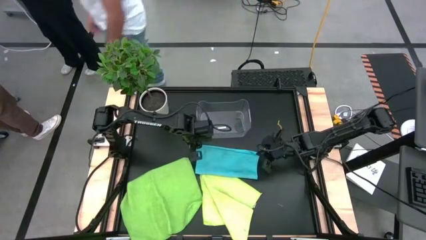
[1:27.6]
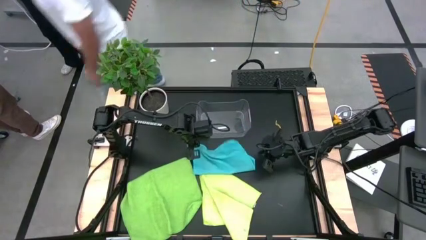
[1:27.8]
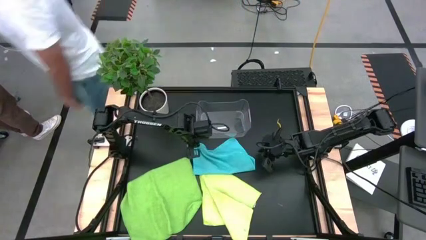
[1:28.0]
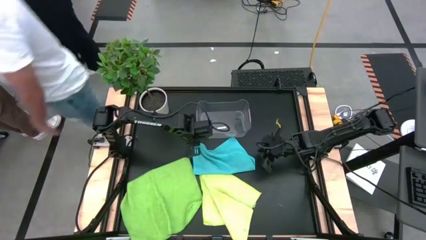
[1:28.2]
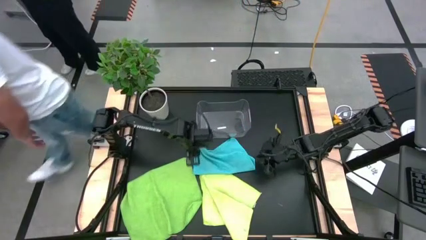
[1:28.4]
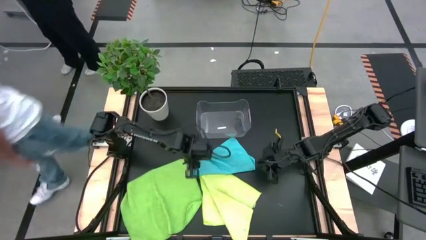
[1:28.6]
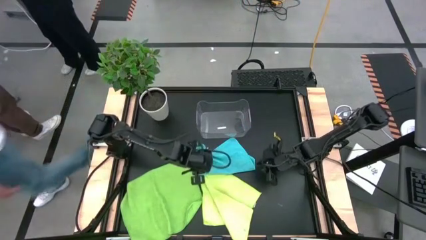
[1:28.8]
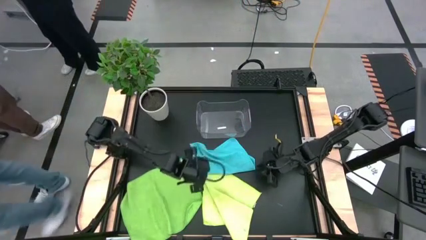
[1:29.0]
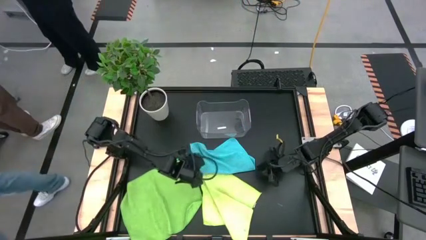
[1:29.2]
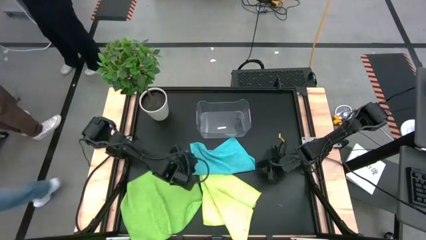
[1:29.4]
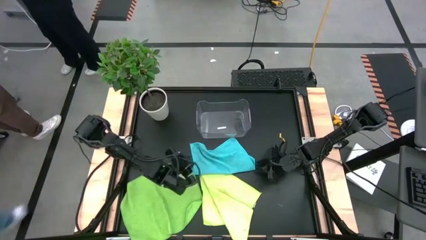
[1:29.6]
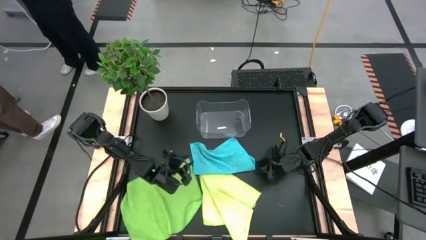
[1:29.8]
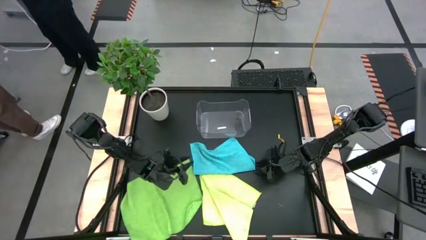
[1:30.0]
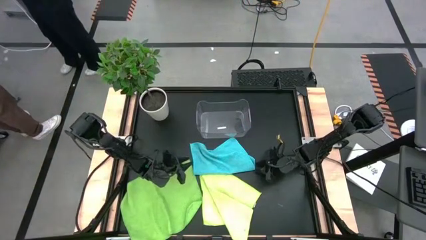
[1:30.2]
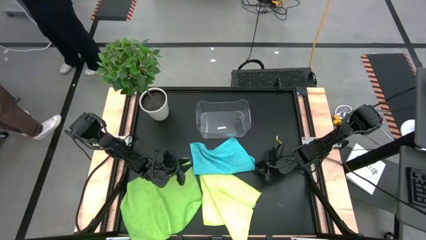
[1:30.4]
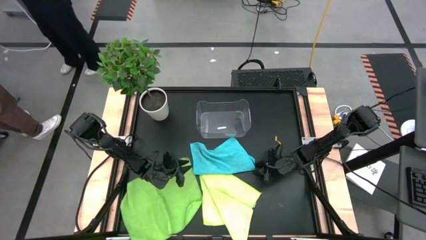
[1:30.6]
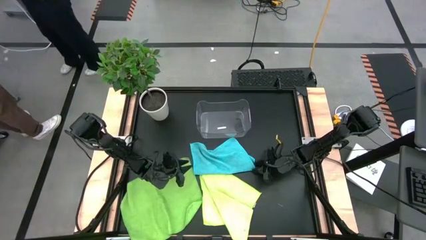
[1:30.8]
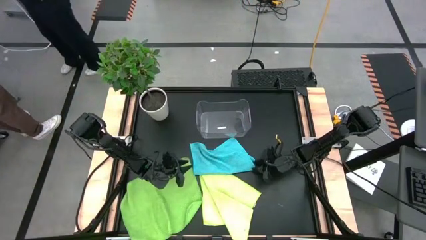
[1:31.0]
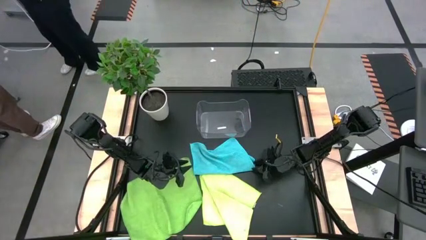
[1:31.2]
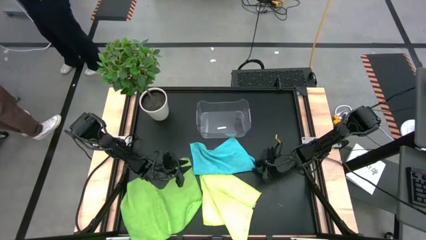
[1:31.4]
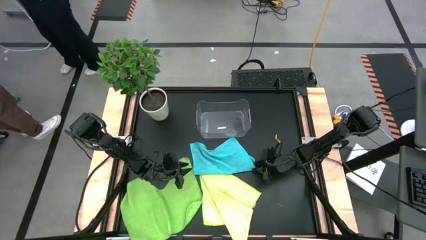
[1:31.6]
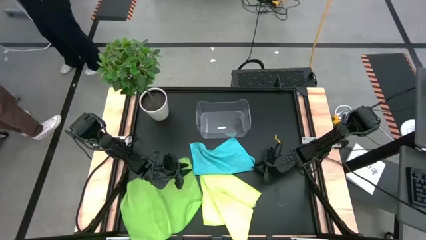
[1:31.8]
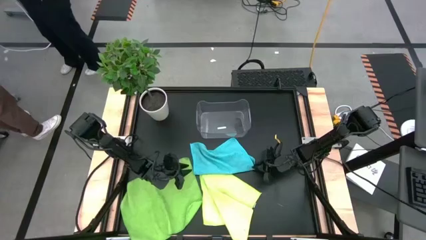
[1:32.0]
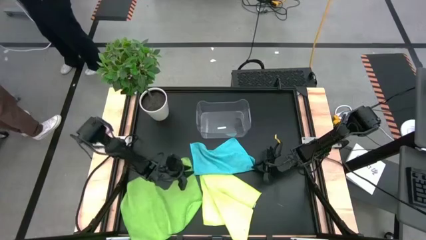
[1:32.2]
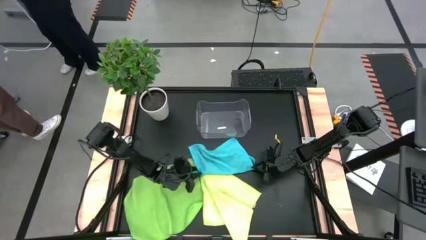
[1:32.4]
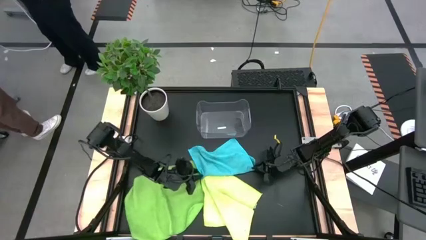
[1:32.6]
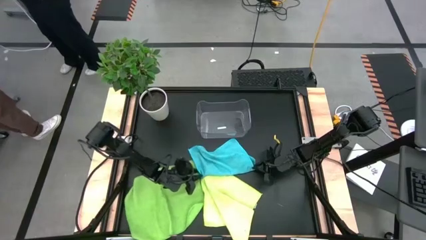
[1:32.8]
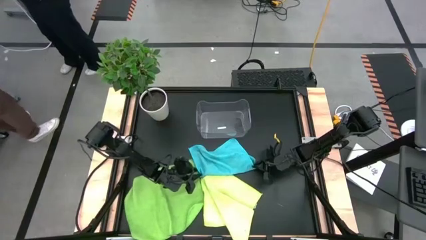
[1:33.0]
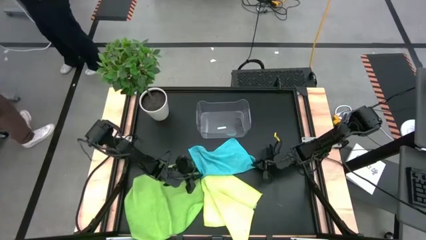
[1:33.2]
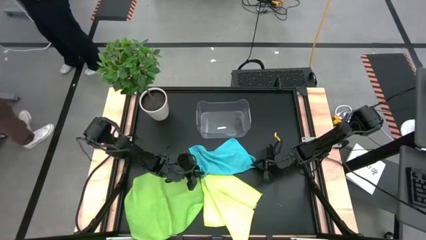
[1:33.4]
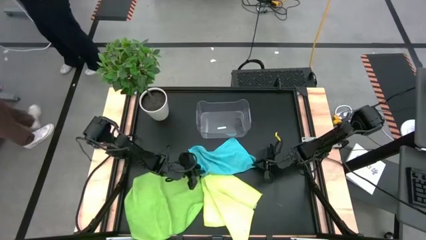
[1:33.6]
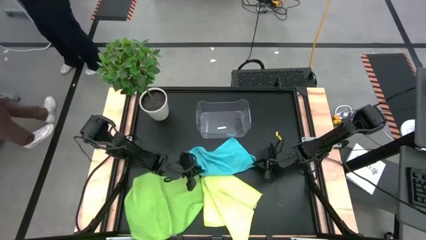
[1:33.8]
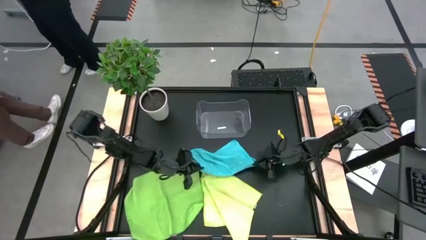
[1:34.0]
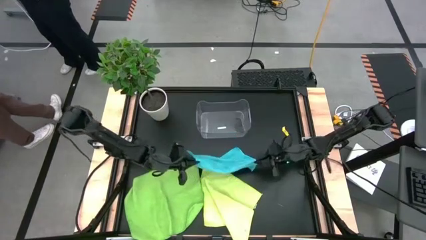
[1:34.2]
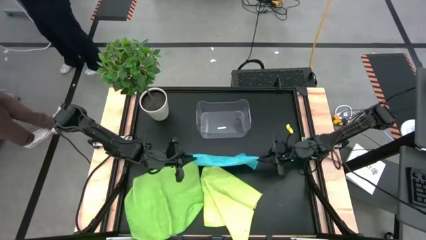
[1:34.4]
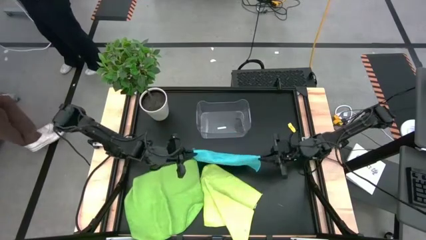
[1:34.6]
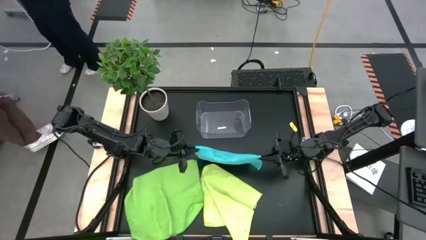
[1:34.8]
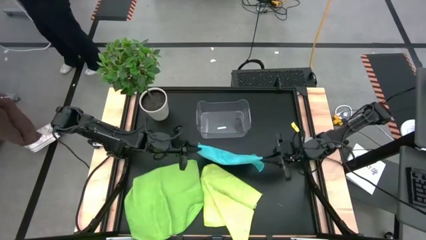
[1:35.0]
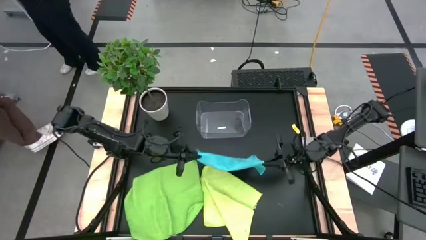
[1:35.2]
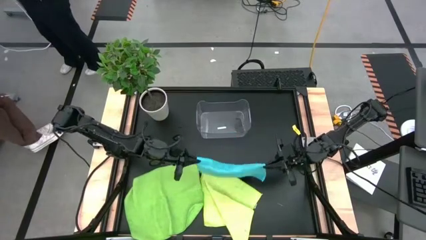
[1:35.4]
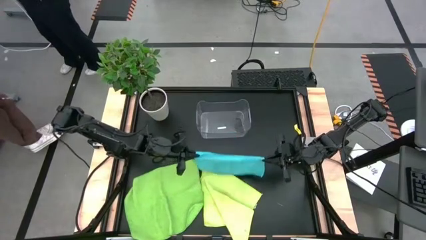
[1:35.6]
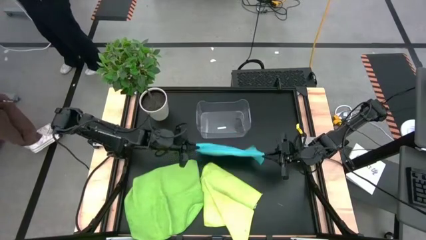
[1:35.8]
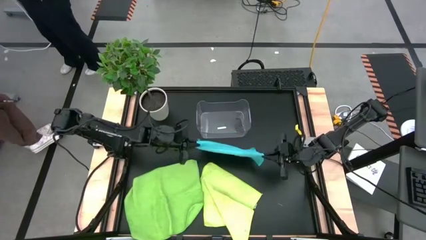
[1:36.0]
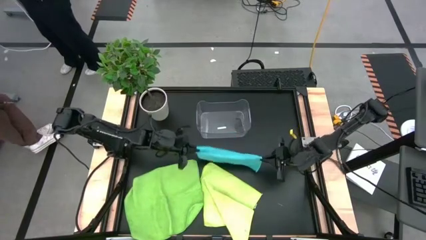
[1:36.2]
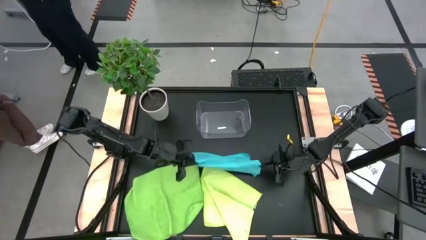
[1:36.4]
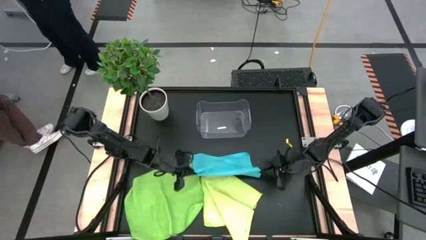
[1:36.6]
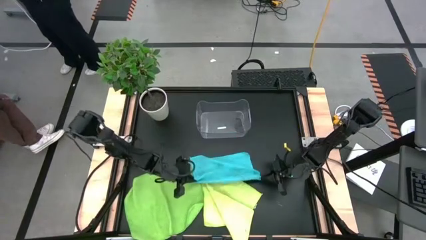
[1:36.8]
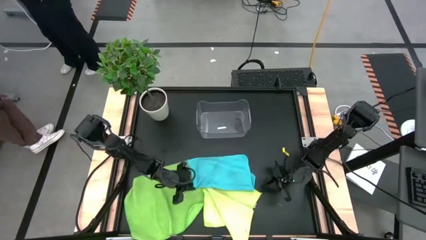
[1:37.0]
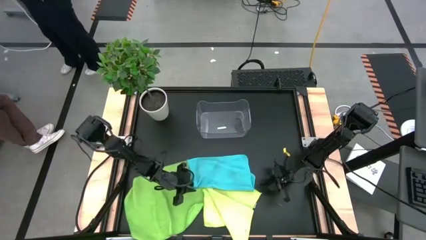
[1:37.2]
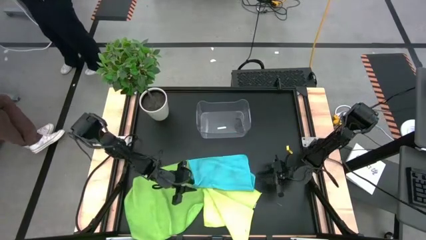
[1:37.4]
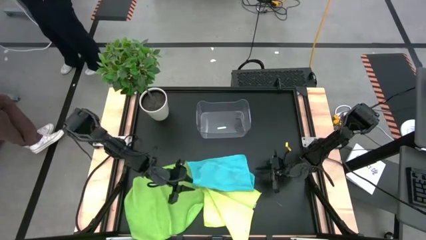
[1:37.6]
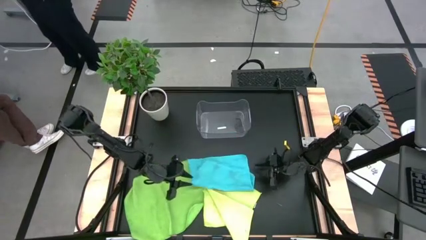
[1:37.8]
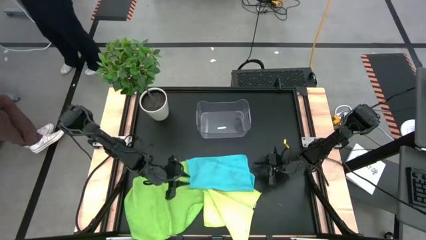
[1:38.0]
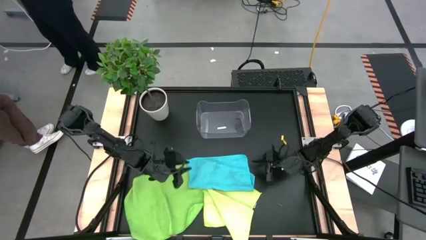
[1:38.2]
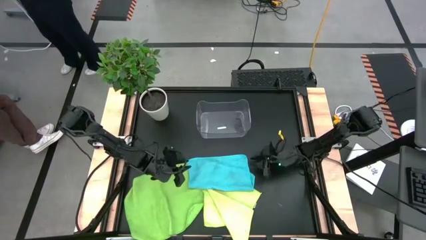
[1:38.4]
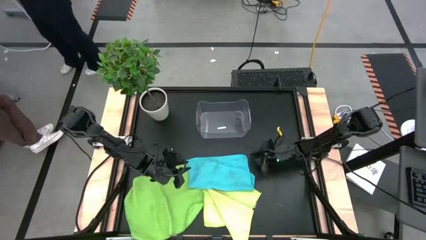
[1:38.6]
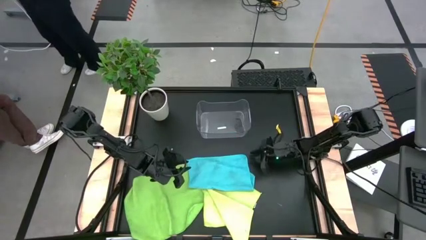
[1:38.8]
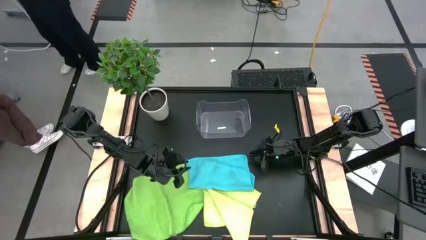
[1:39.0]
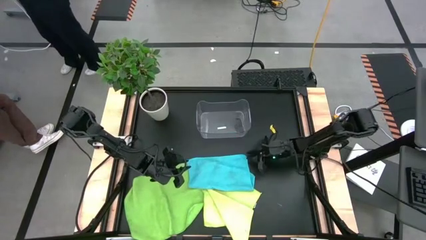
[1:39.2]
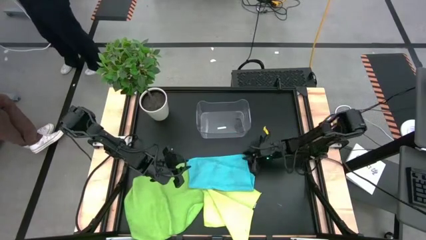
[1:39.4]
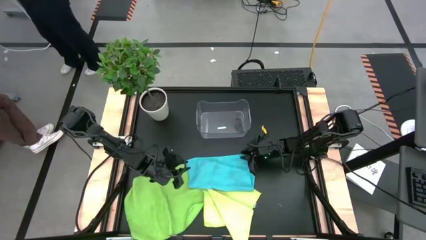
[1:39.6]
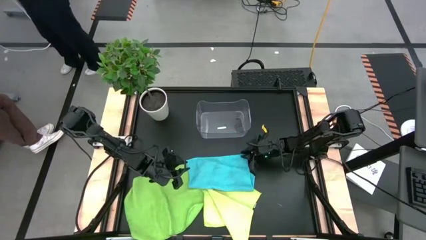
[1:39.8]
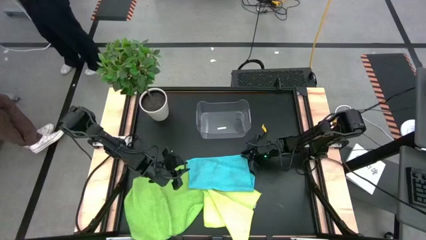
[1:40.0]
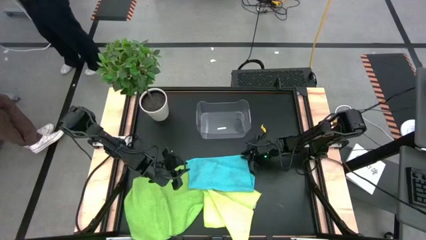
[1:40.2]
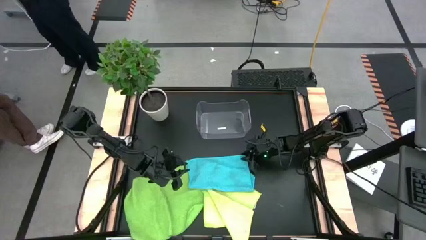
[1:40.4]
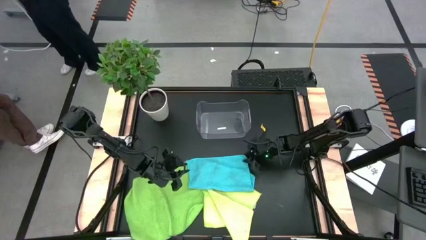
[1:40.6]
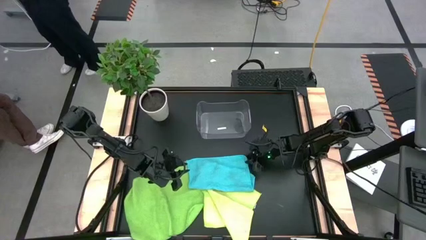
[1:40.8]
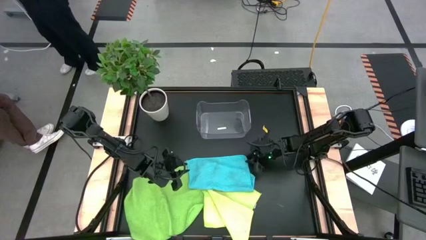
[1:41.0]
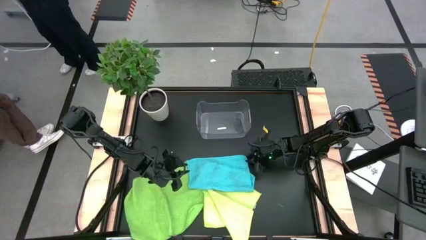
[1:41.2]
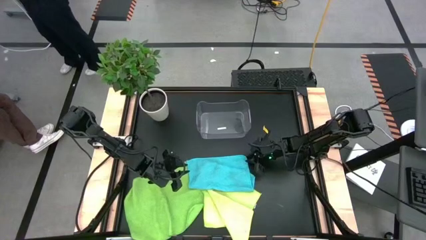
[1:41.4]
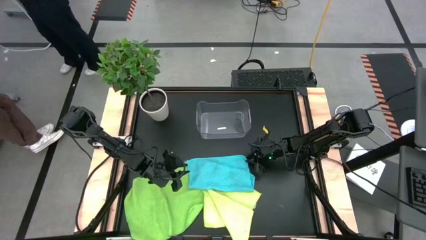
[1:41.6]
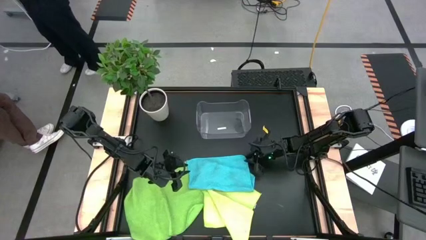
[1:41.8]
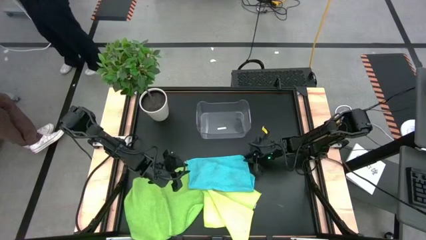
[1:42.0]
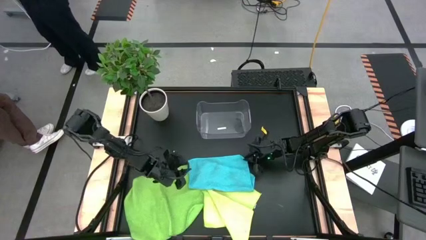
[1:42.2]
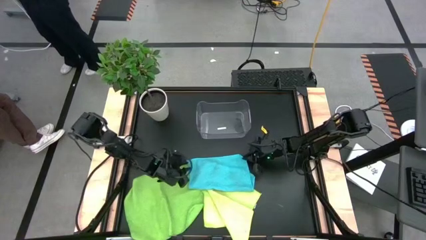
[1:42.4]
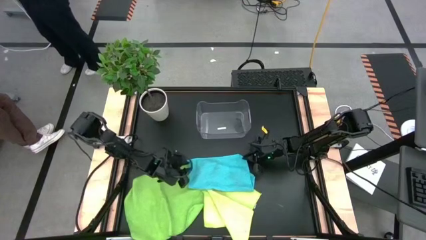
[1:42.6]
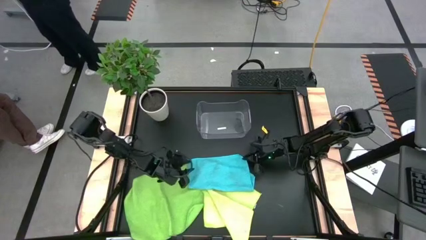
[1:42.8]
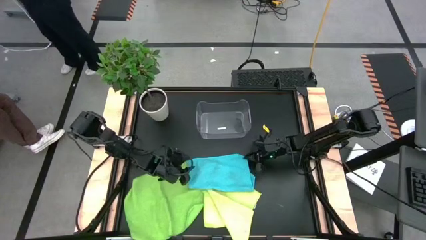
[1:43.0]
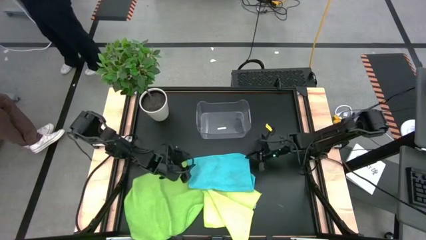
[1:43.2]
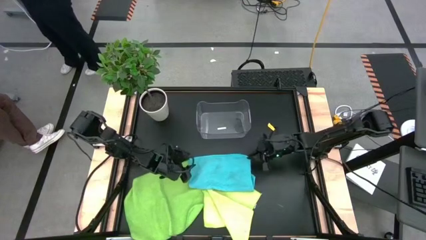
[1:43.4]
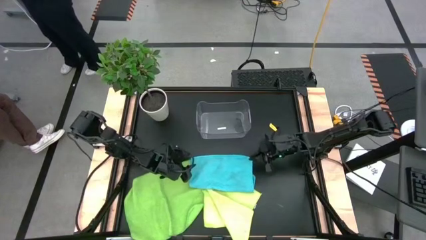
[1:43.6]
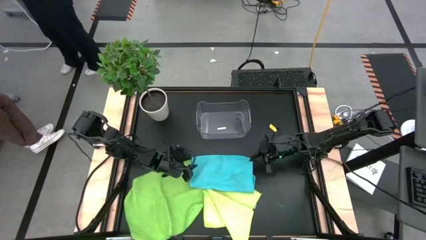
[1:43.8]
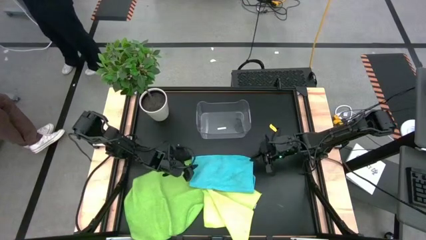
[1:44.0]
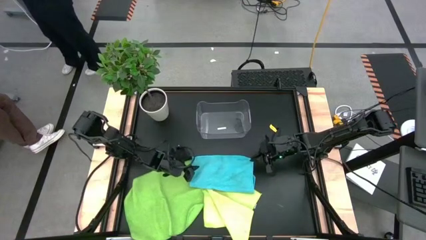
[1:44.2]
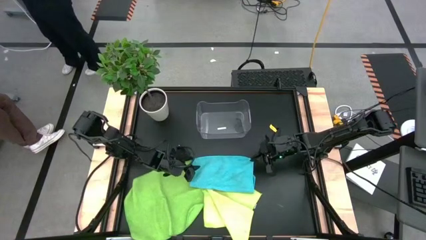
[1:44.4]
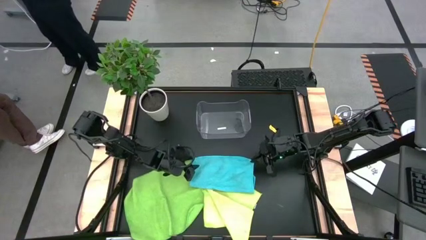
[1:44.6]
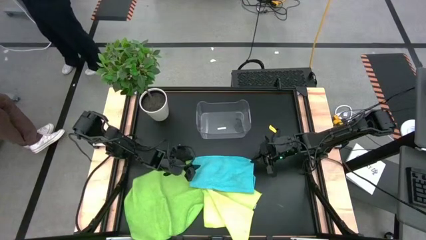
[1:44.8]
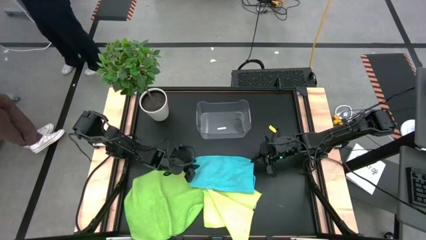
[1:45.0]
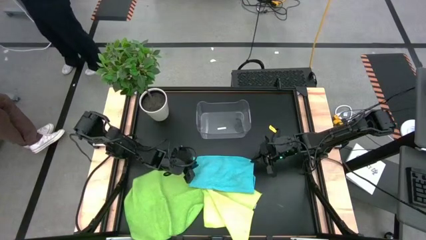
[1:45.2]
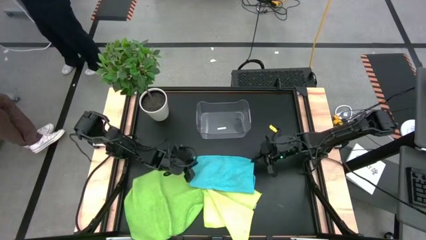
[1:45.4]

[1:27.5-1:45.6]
Task: Fold microfiber towels
Fold the blue towel
